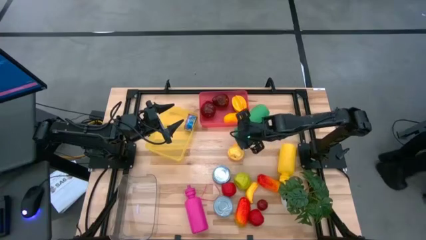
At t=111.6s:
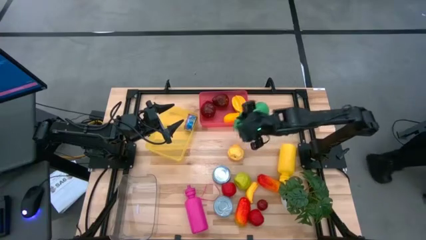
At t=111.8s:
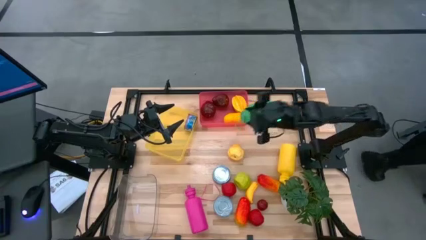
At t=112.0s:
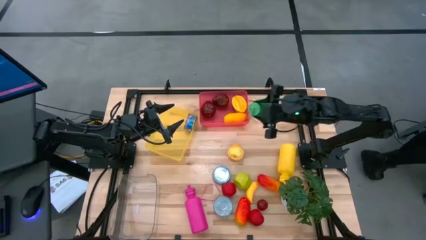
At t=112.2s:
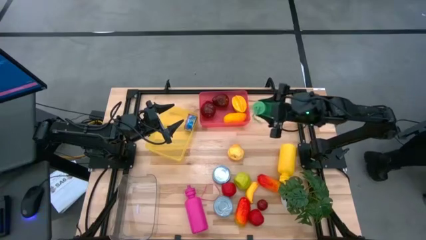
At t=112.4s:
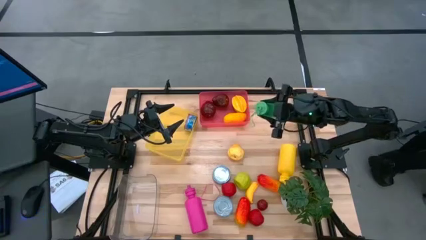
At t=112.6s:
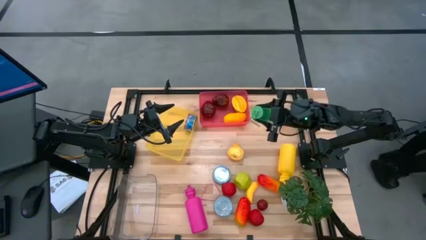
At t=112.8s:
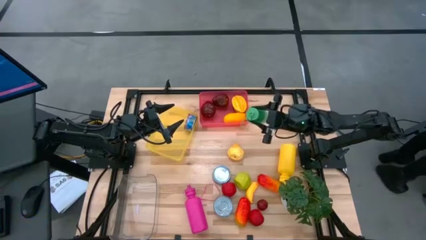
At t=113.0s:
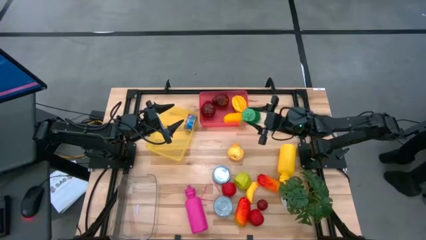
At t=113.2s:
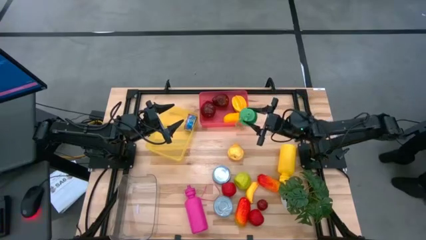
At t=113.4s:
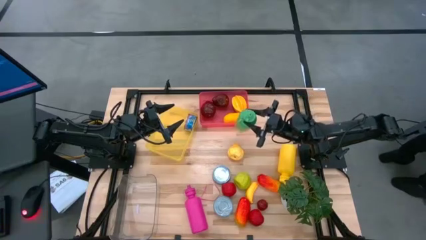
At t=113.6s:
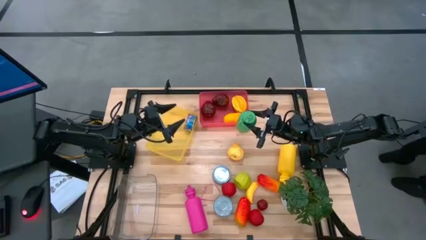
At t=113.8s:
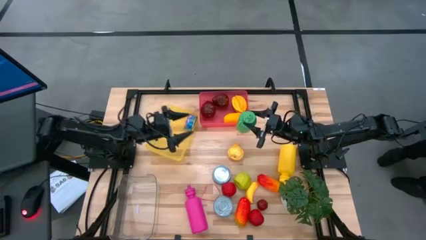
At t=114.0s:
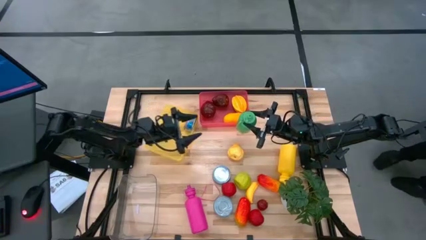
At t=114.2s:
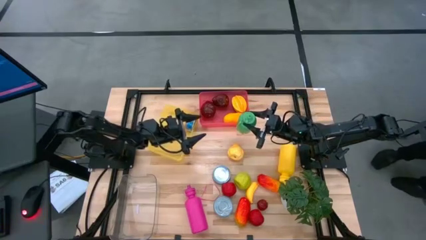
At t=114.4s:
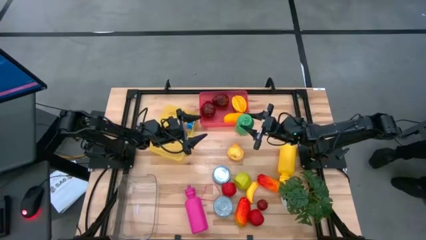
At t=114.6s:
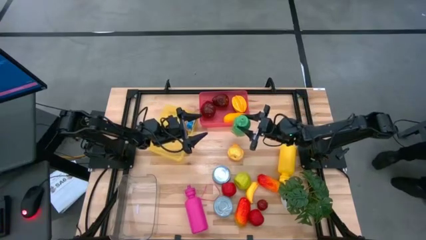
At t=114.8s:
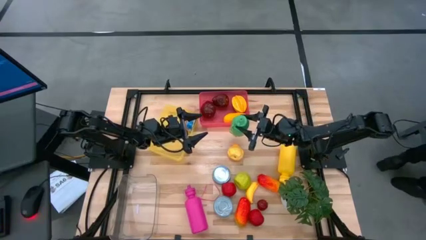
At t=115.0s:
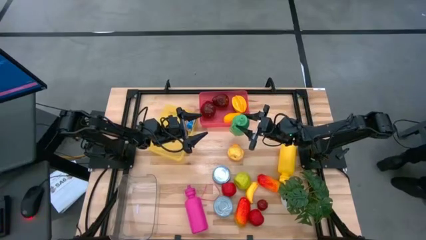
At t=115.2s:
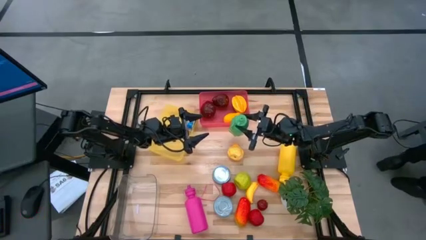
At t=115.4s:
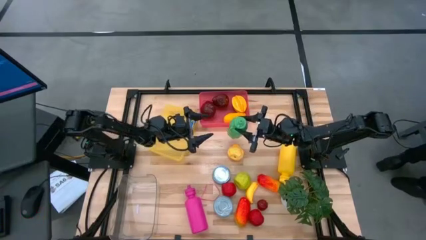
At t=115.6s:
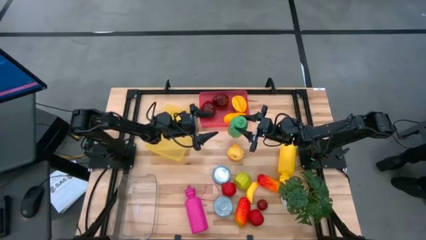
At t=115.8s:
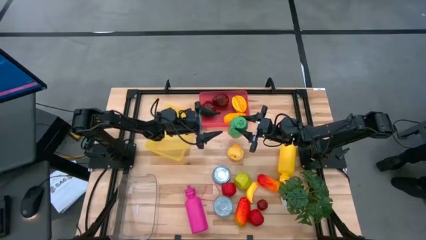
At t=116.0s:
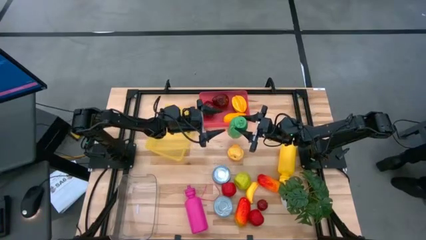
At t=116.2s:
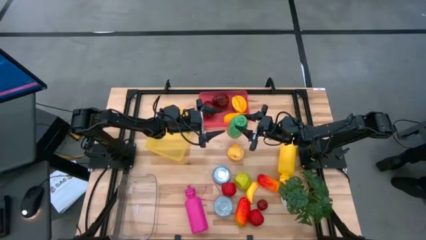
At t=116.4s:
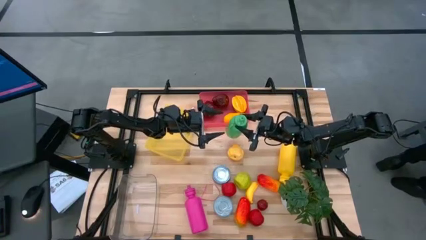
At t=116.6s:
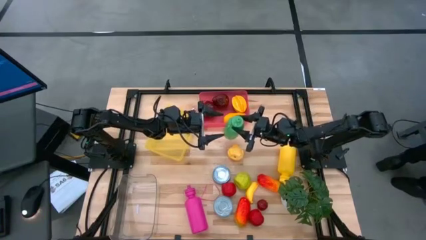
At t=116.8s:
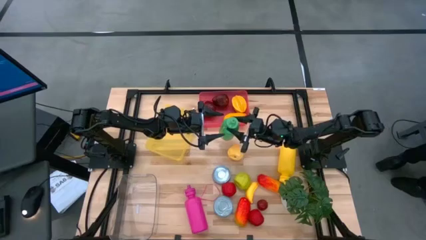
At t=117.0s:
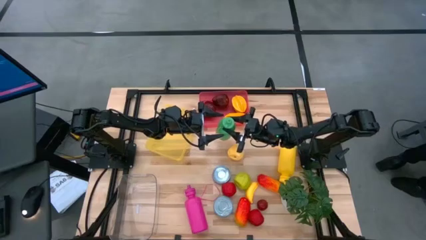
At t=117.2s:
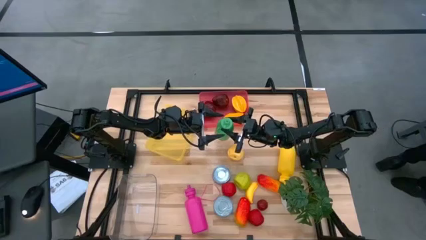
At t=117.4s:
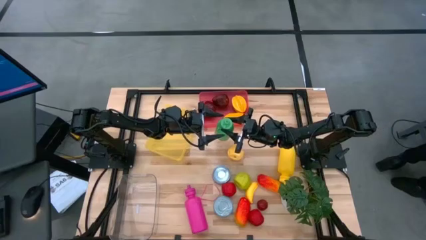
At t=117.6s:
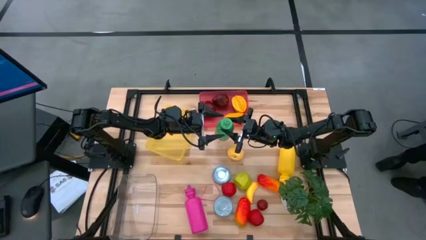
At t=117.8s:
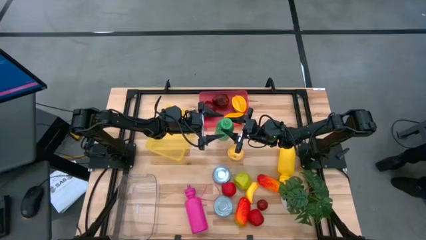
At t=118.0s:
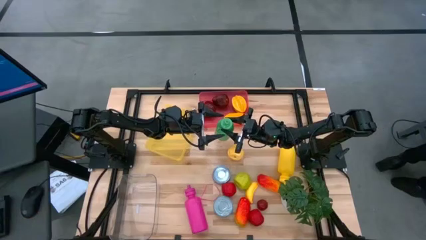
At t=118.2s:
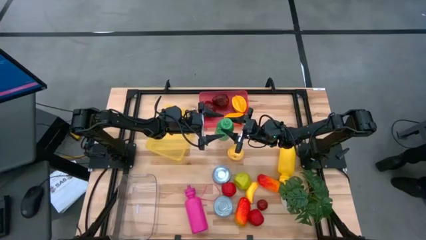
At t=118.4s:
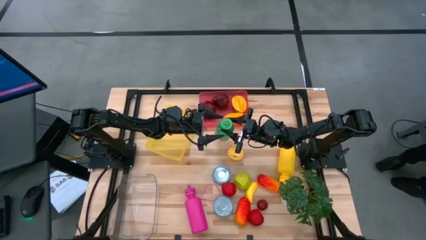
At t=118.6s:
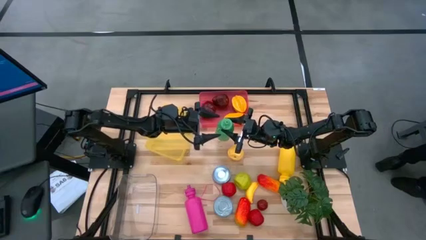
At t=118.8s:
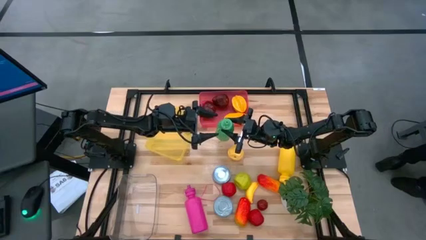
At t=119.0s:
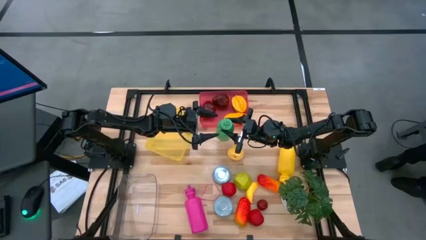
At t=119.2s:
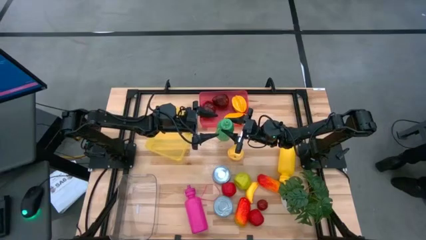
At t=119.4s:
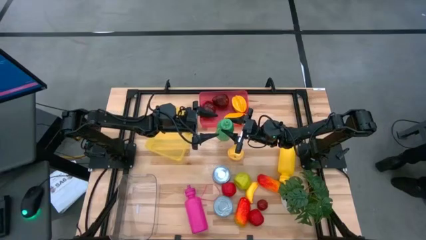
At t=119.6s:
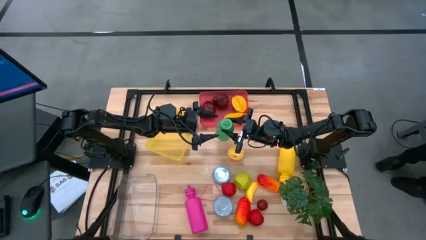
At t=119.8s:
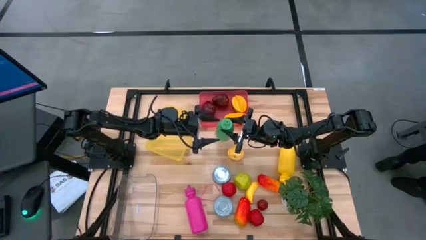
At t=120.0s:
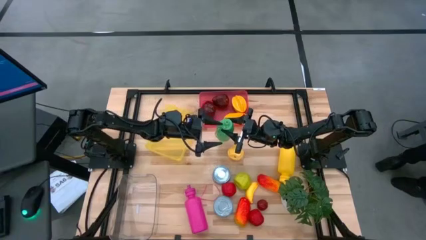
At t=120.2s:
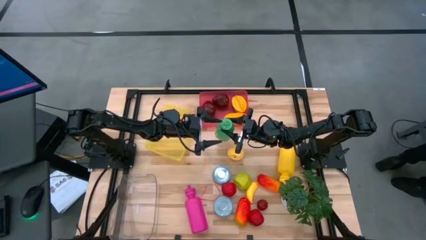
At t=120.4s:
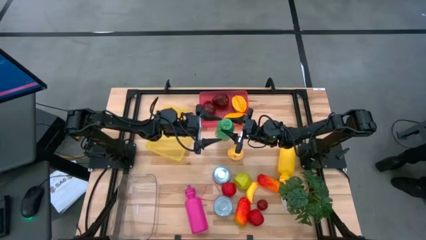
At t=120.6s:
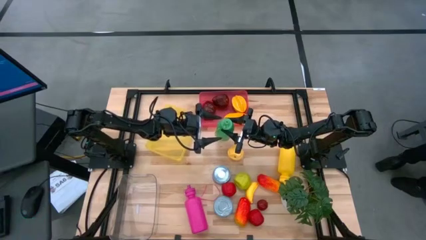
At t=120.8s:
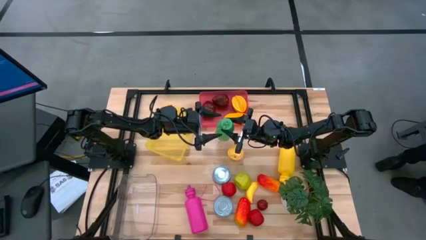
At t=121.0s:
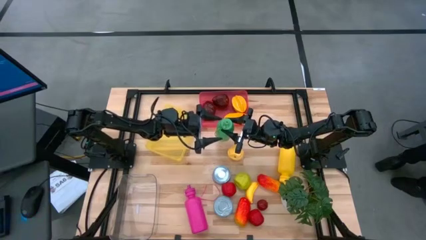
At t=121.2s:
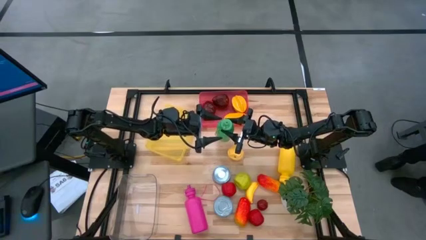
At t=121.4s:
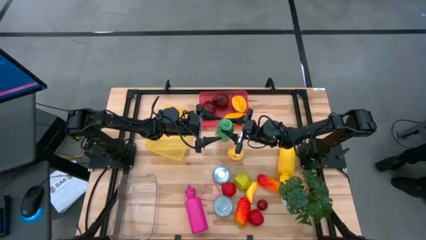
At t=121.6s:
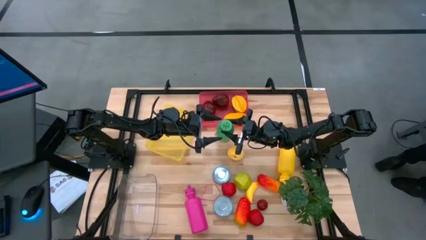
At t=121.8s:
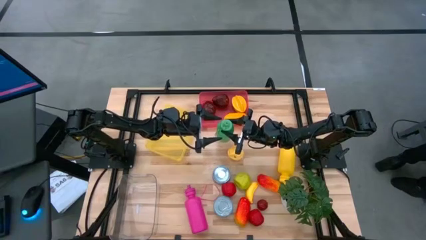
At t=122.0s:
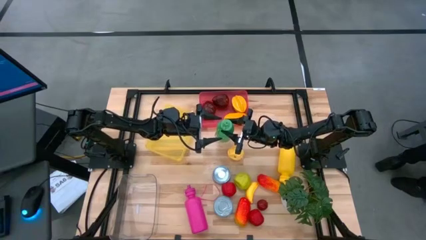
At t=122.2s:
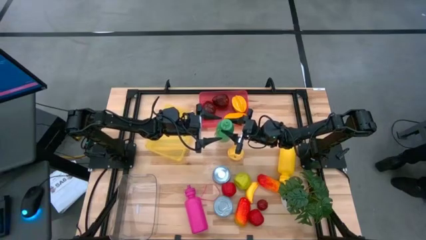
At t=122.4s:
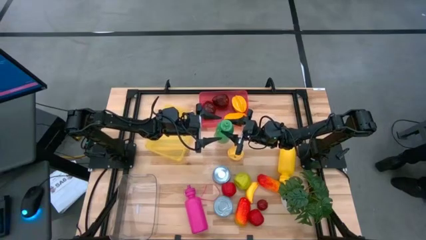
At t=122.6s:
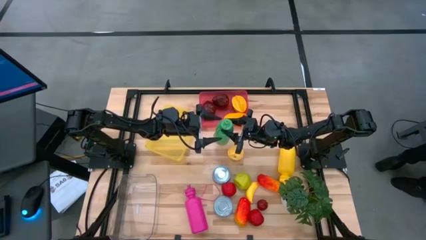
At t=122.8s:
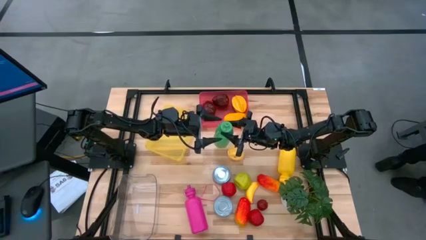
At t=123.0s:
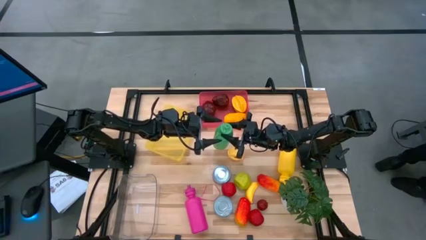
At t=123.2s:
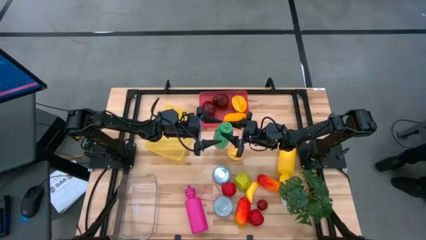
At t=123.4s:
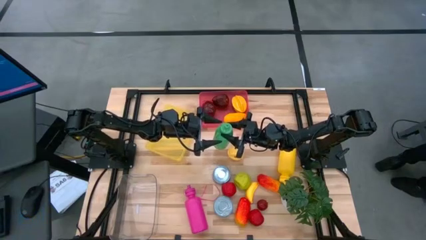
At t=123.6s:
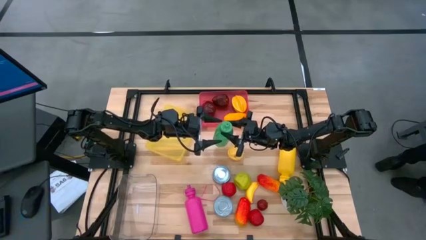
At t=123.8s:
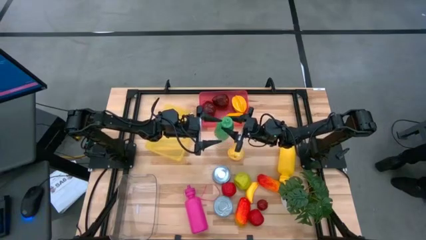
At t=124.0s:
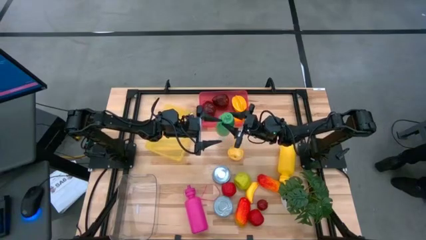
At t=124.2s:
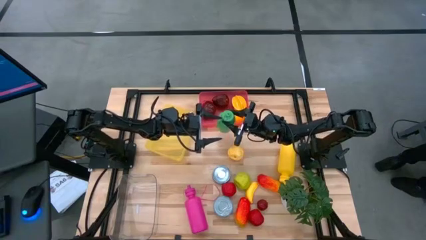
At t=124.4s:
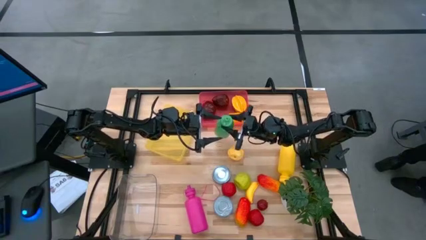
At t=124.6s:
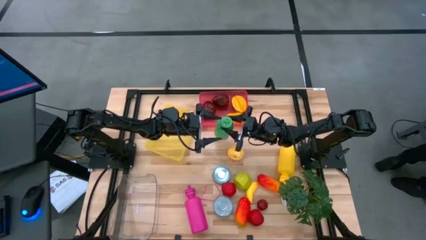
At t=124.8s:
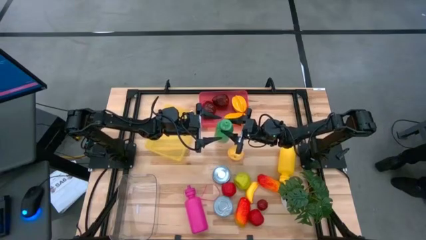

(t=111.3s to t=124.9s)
Task: Pick & Place Food Item
Put the green water bottle into the transparent bin
